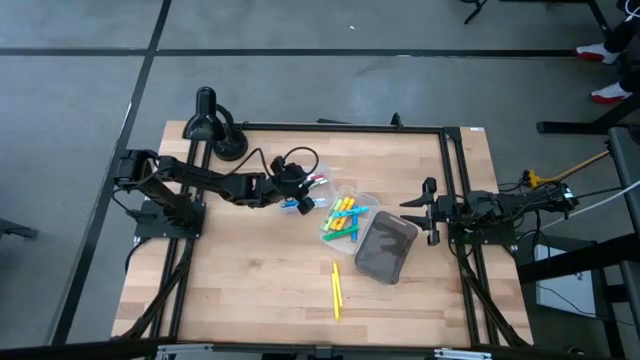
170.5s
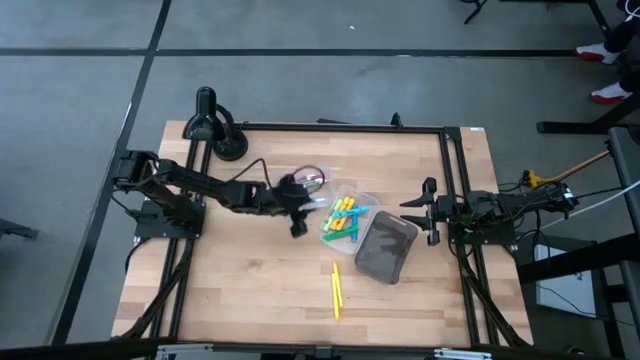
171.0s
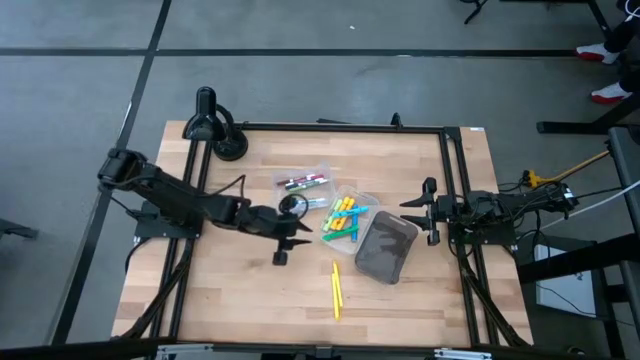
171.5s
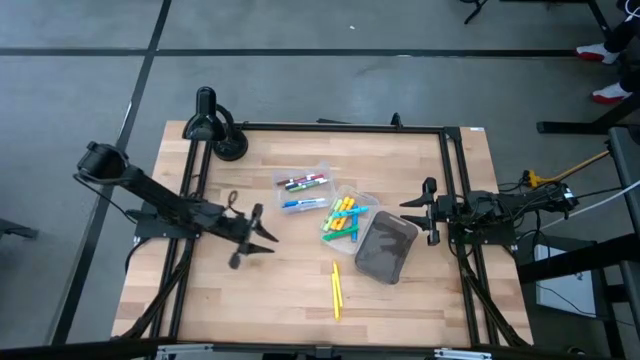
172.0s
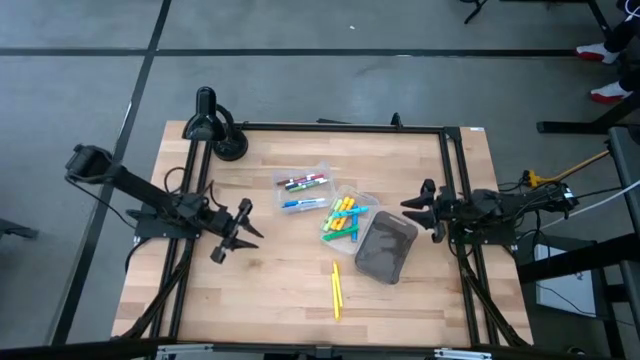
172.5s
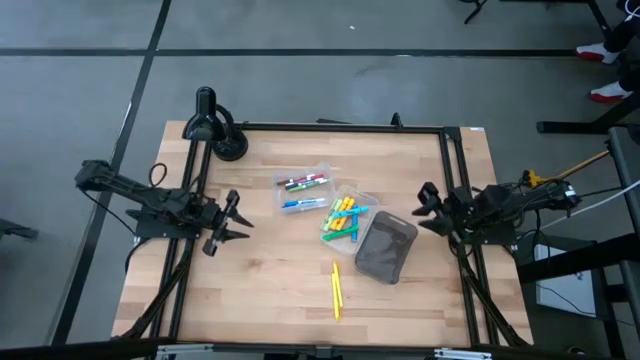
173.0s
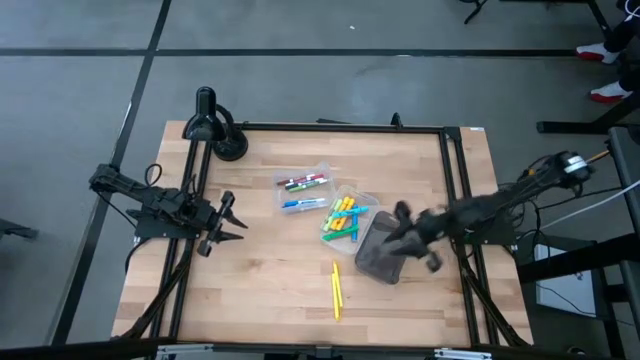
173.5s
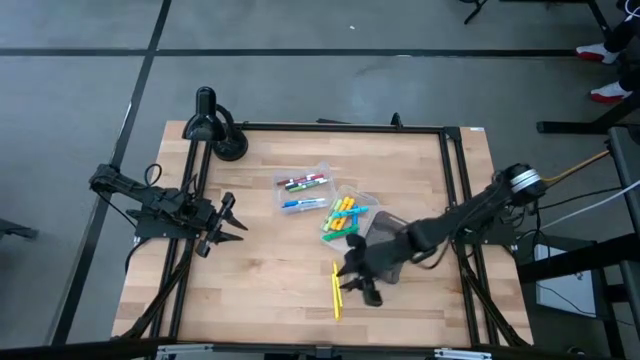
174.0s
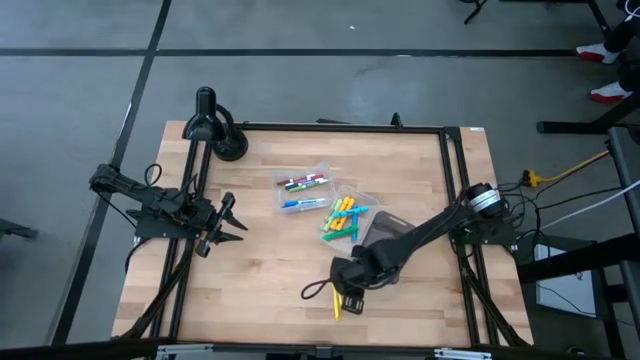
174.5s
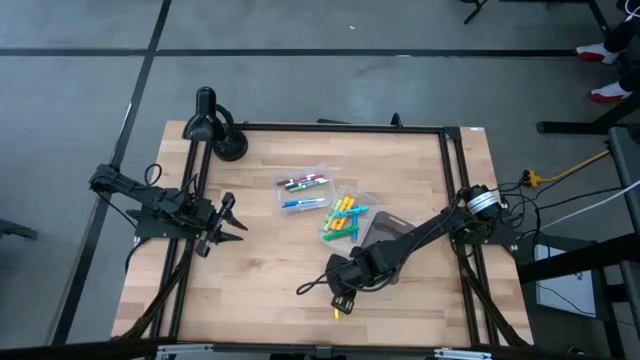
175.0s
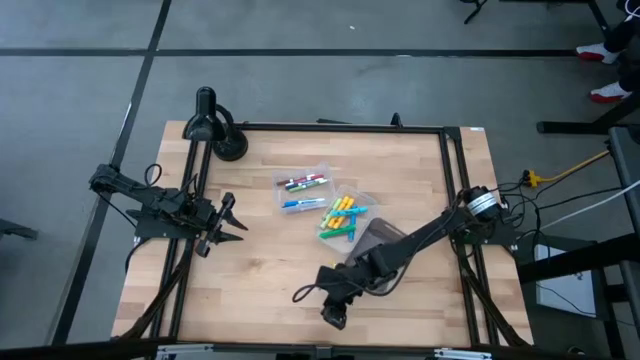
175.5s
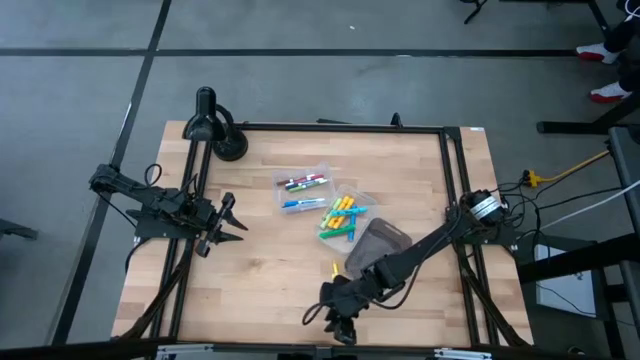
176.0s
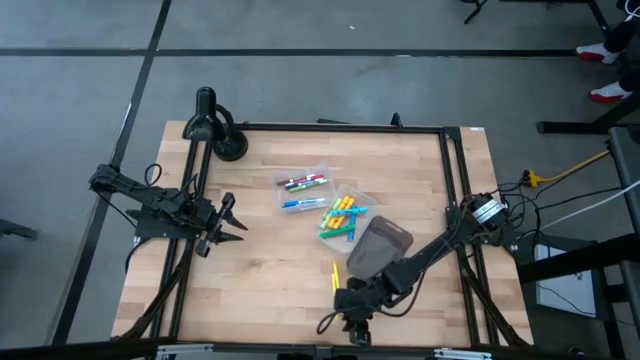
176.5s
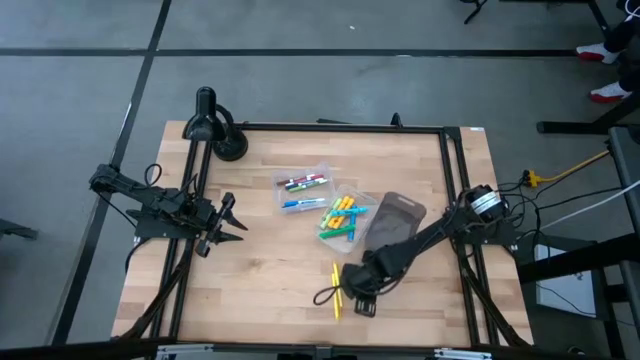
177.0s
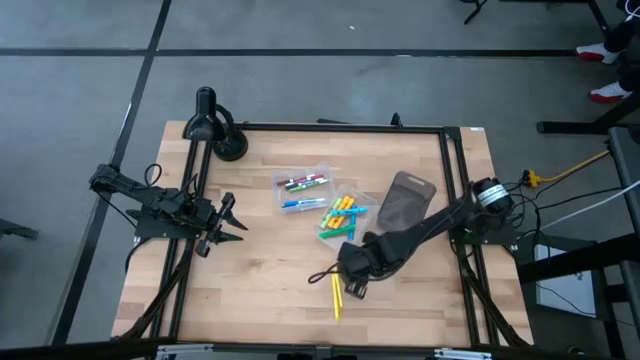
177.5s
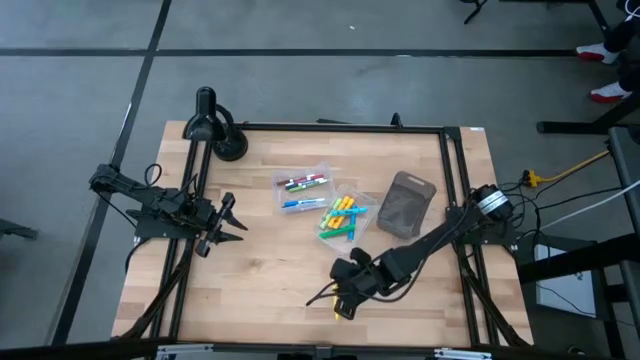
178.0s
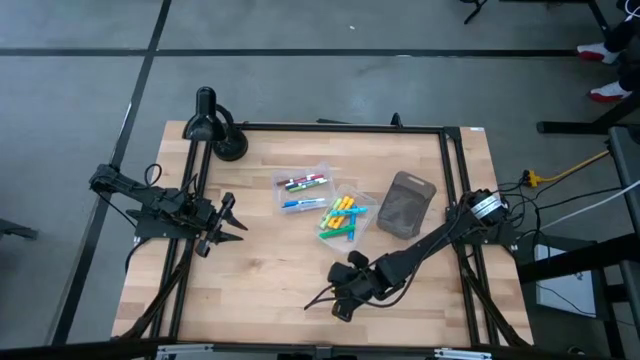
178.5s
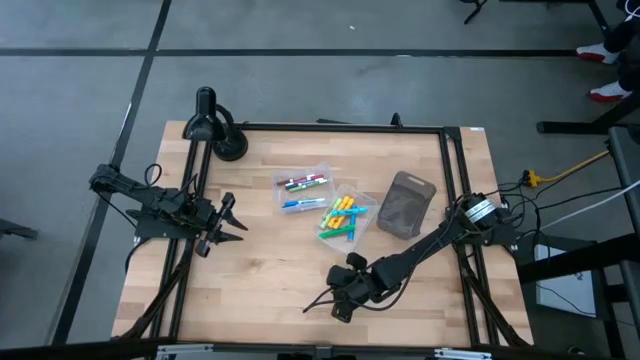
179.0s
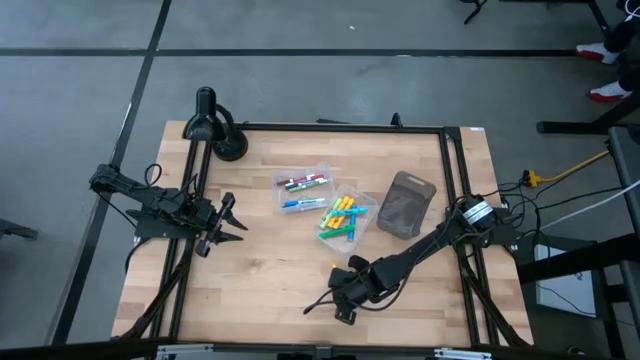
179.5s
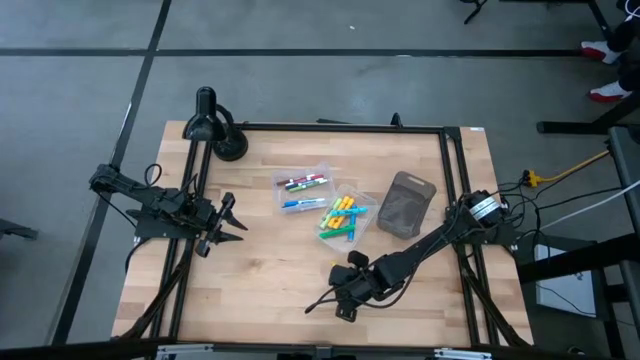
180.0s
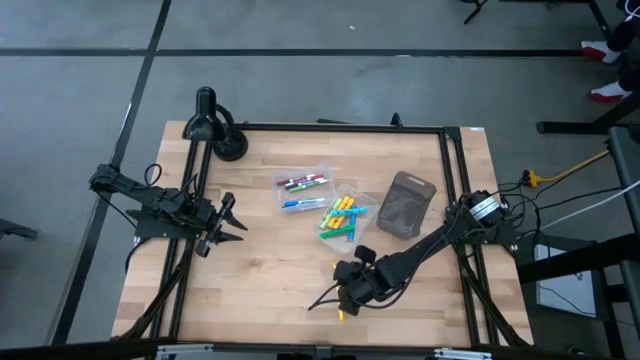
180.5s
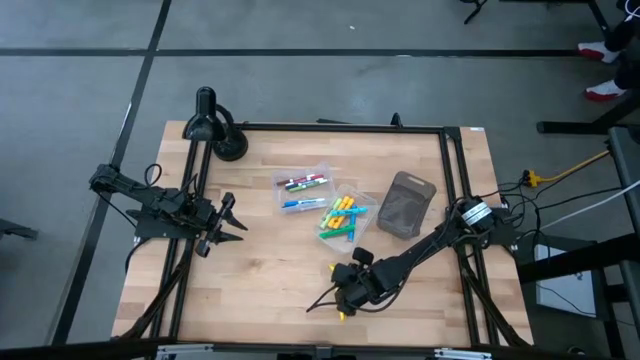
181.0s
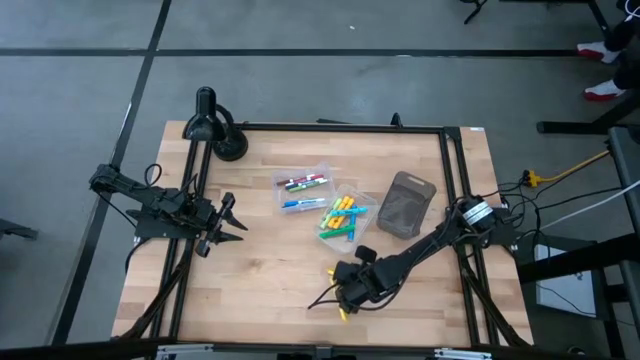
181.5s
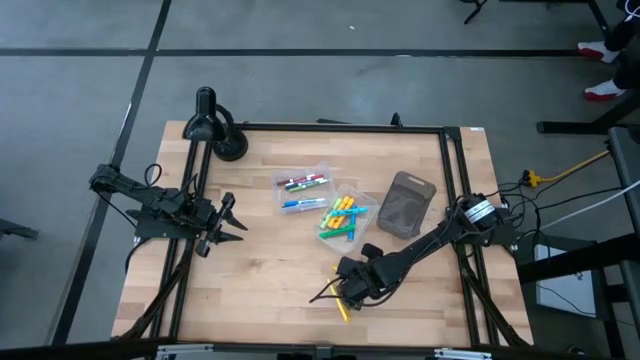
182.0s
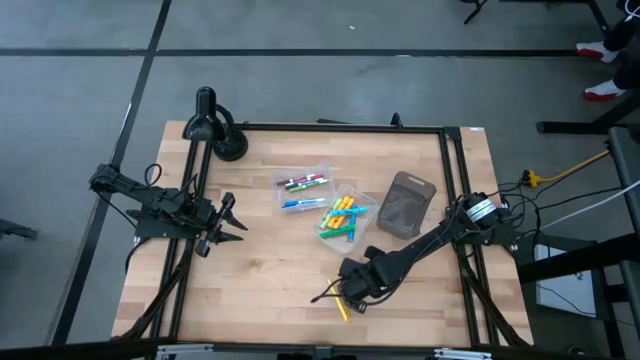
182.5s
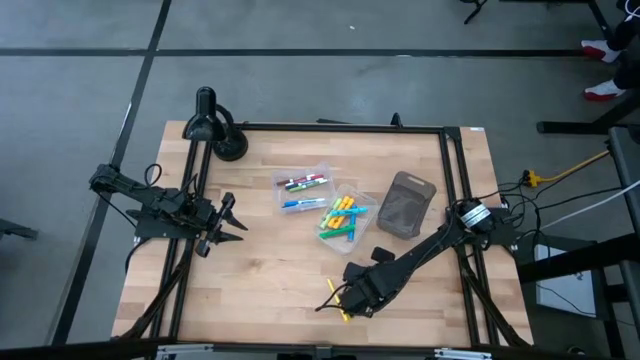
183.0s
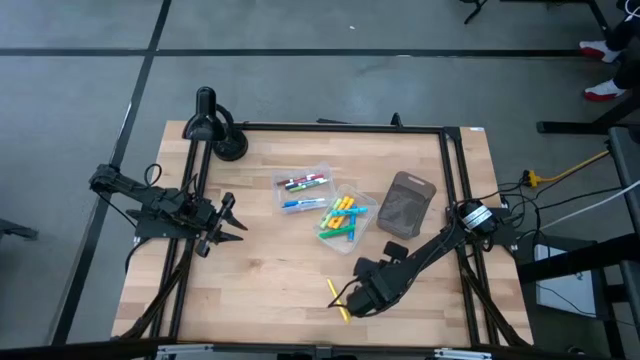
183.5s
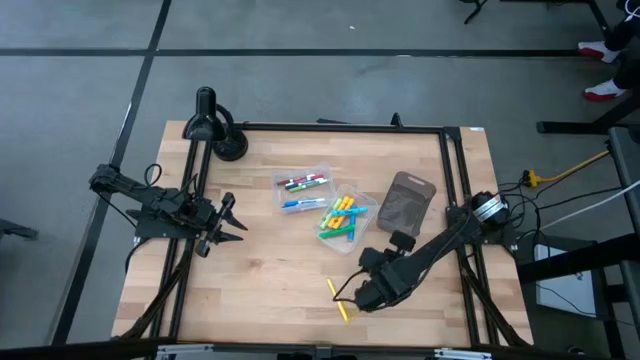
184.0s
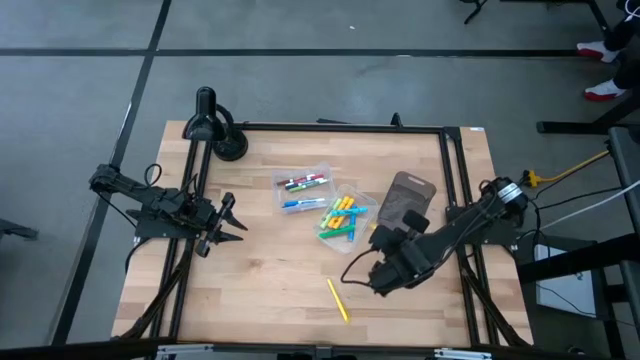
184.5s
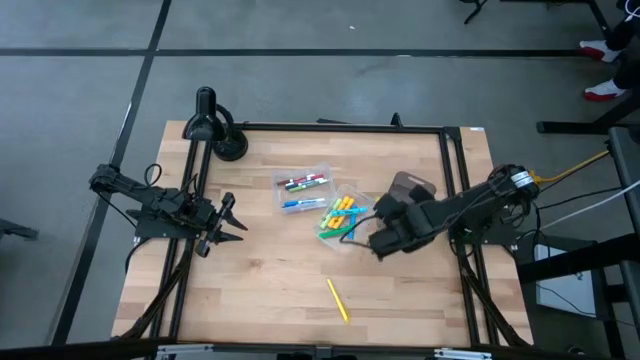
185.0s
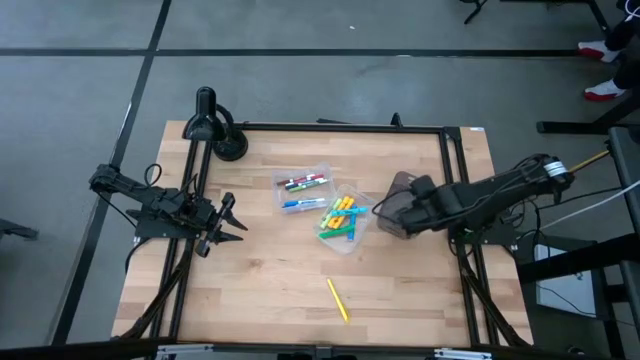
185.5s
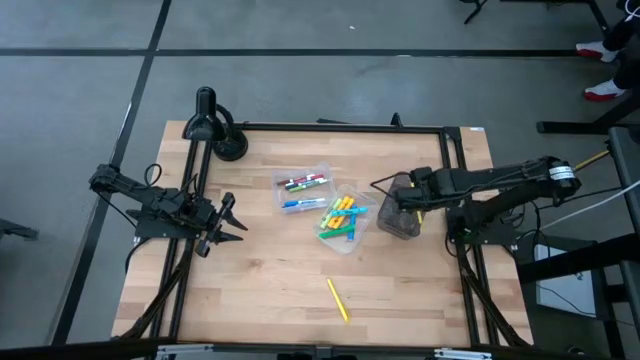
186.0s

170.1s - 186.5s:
Task: Pick & Place Markers
Put the right yellow pen into the black bin

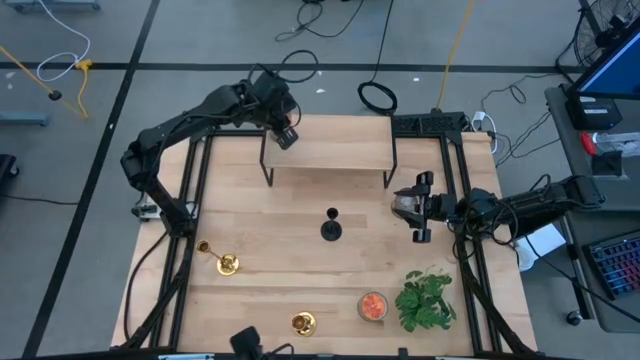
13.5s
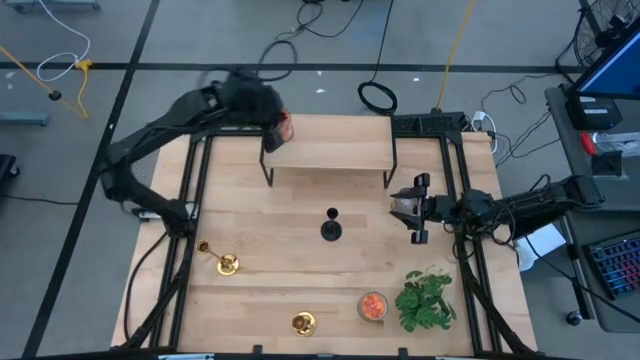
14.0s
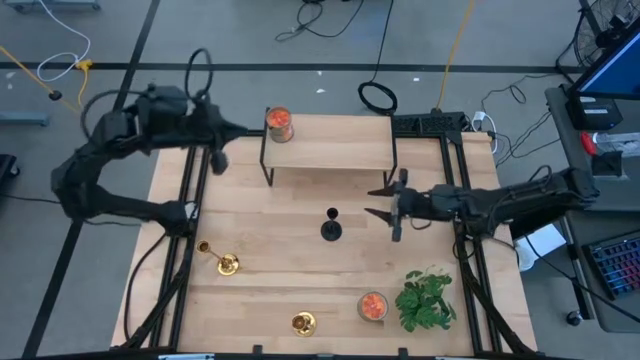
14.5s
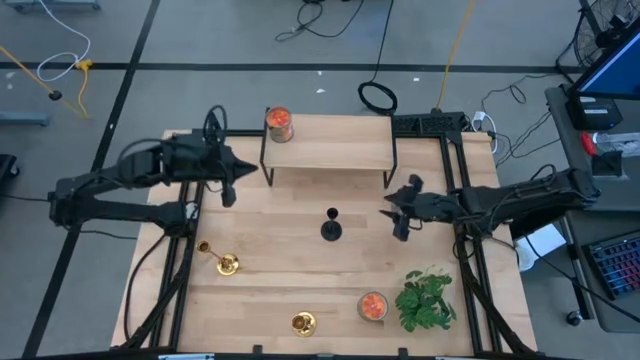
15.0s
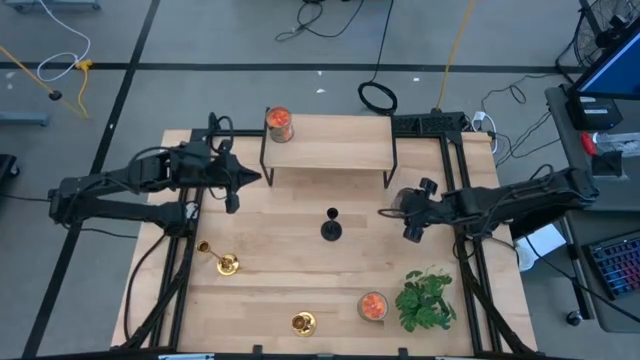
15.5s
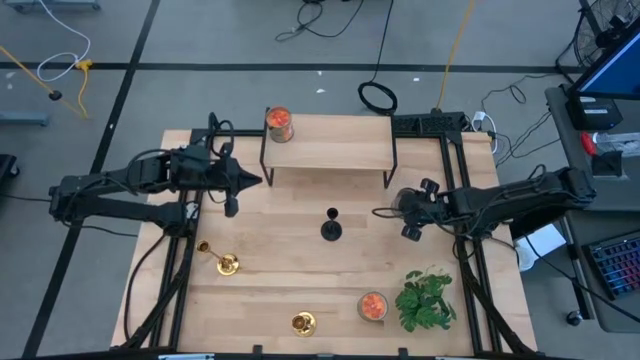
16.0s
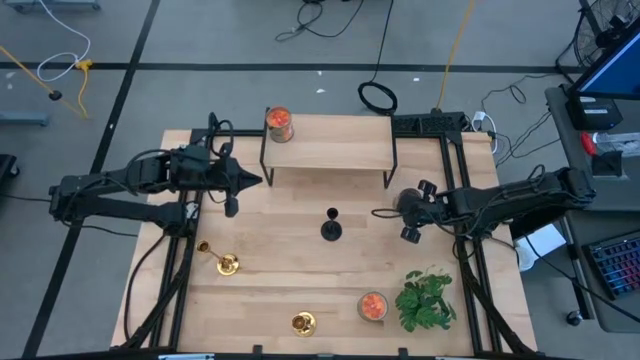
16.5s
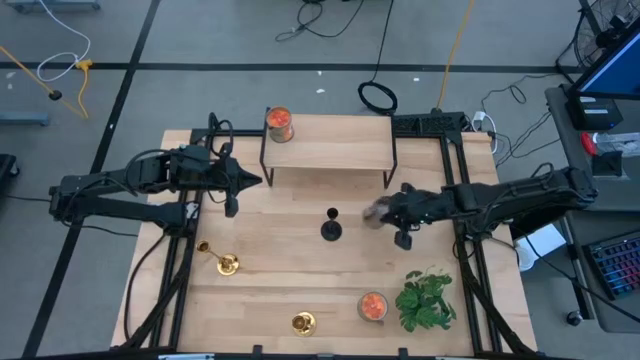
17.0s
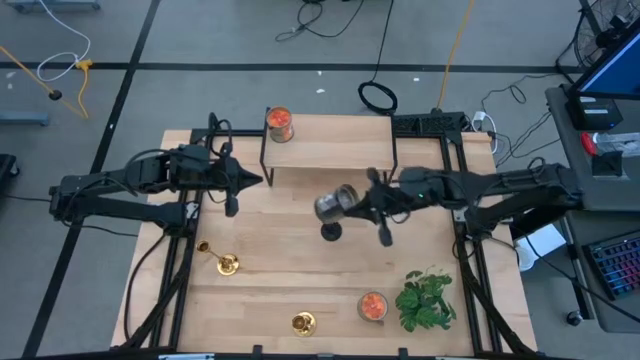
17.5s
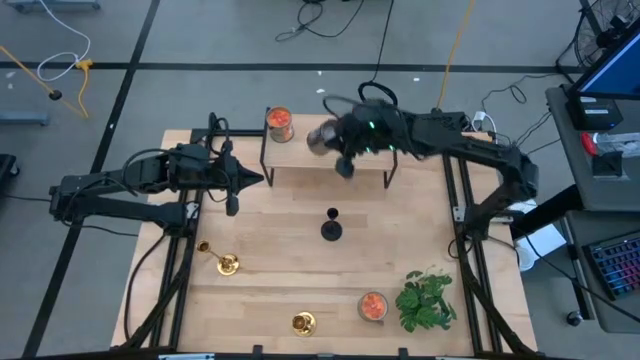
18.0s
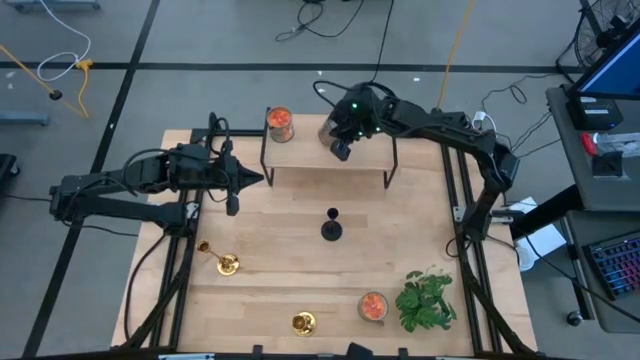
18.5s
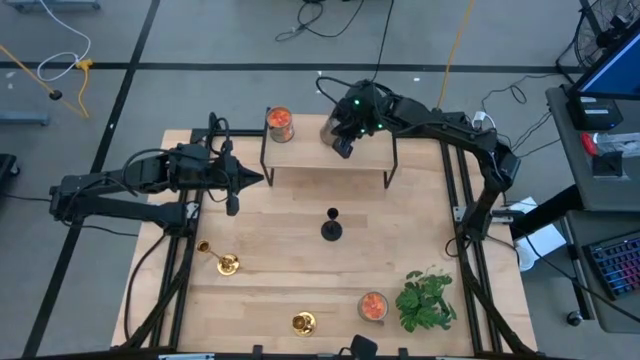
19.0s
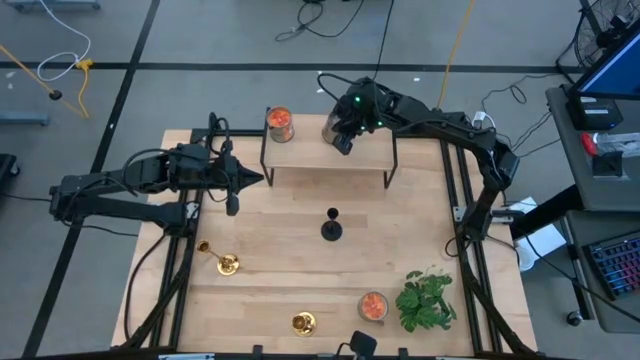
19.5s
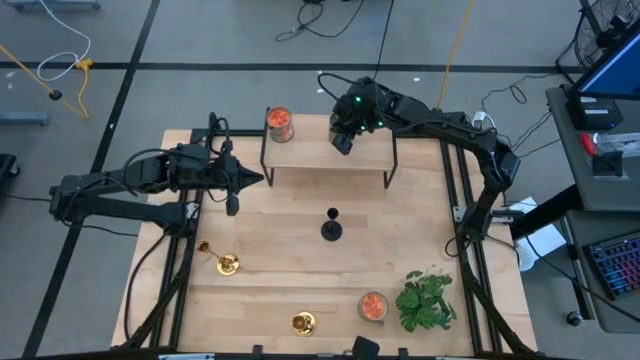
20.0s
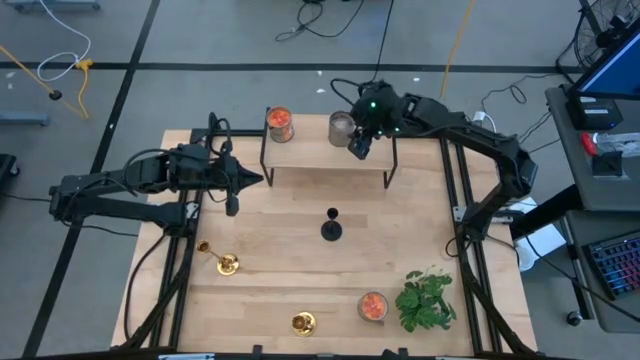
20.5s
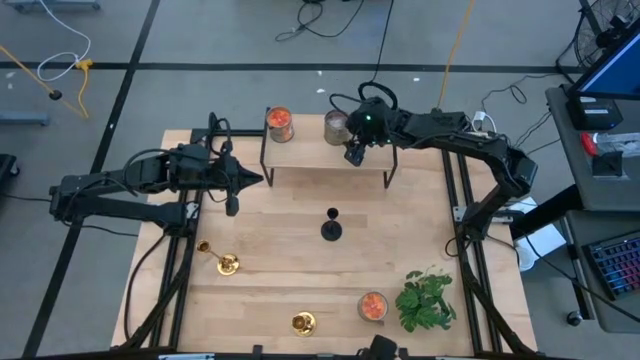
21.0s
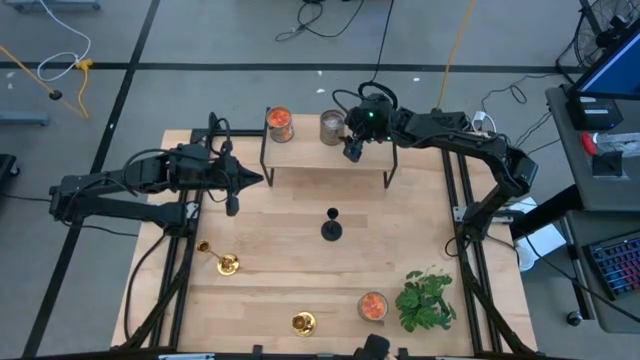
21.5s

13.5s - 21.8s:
Task: Pick & Place candle stick holders
Align the brown scented candle with the other scented candle
